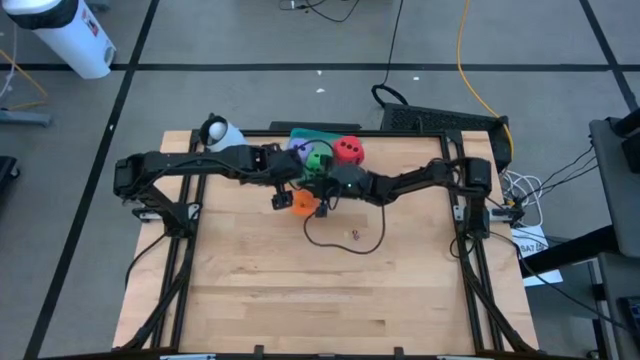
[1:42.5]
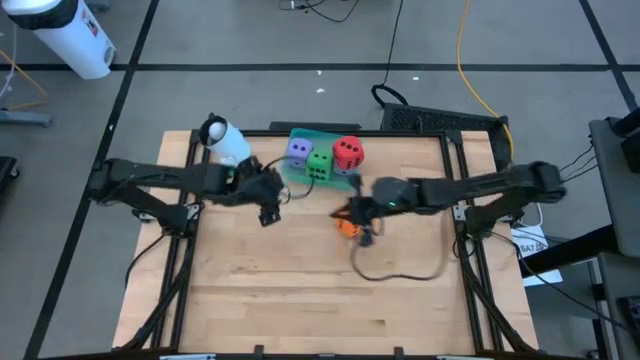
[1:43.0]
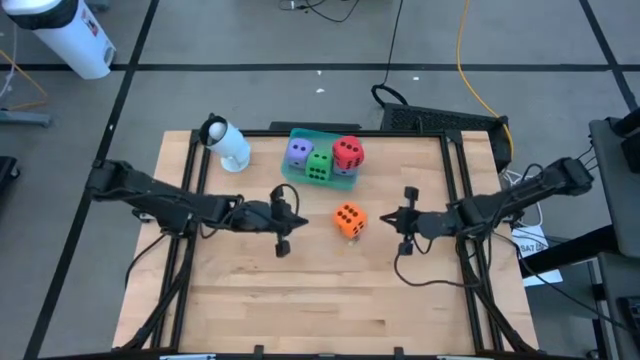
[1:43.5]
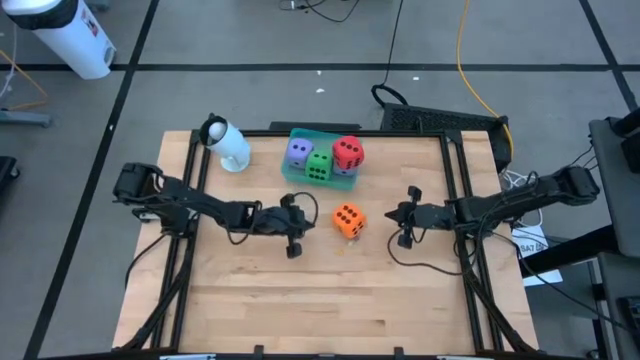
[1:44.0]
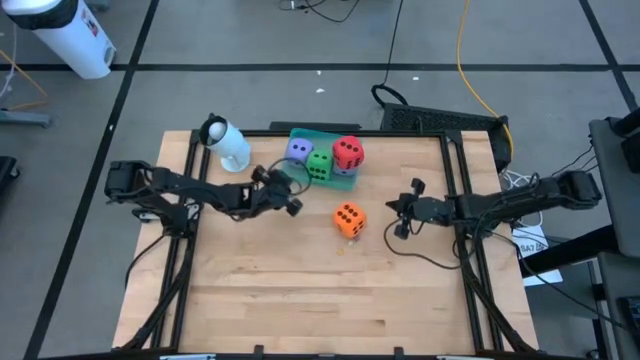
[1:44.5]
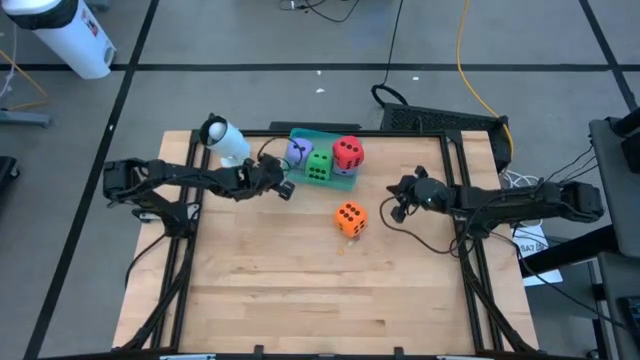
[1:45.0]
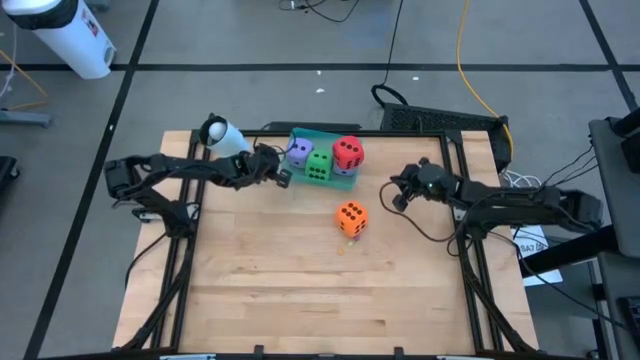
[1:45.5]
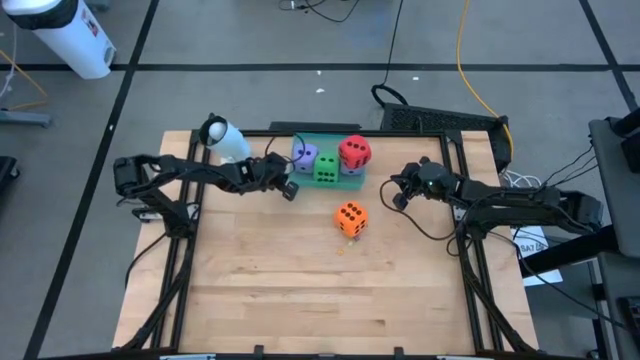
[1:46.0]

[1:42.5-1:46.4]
Task: Pick & Place Dice
Adjust the blue bin on the table

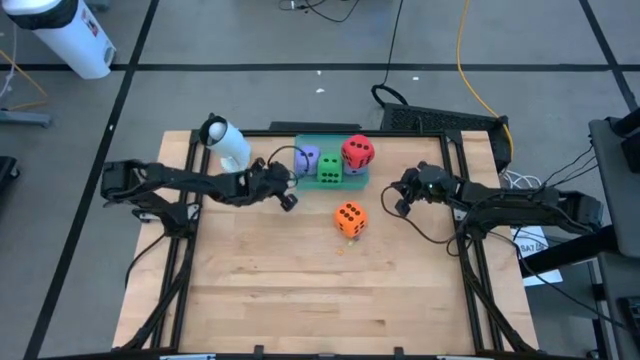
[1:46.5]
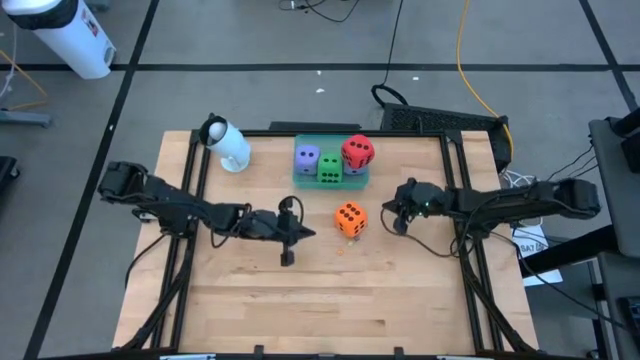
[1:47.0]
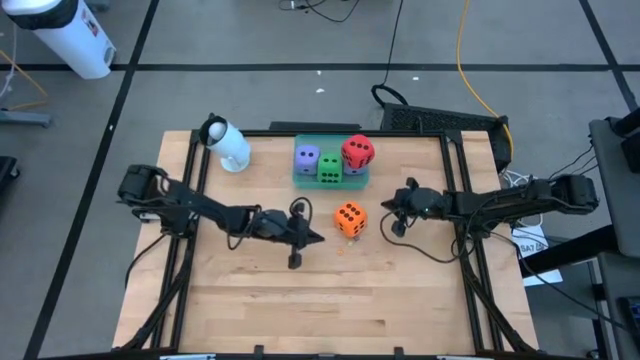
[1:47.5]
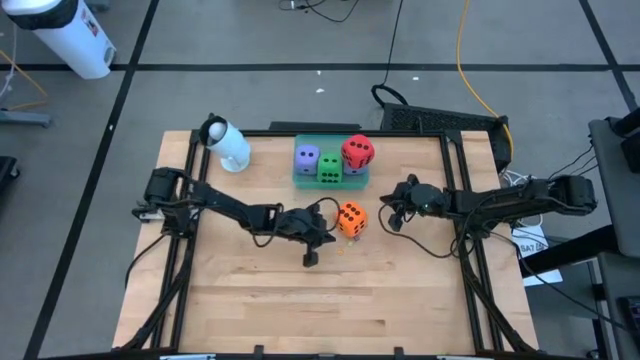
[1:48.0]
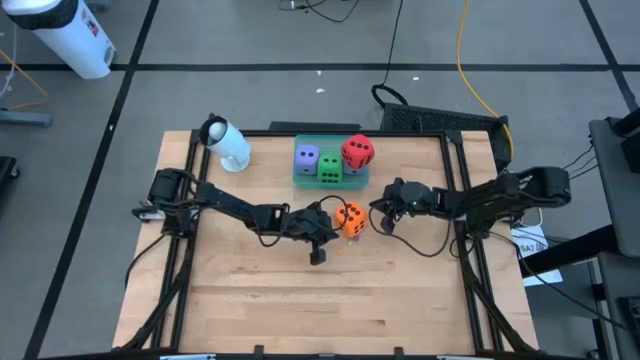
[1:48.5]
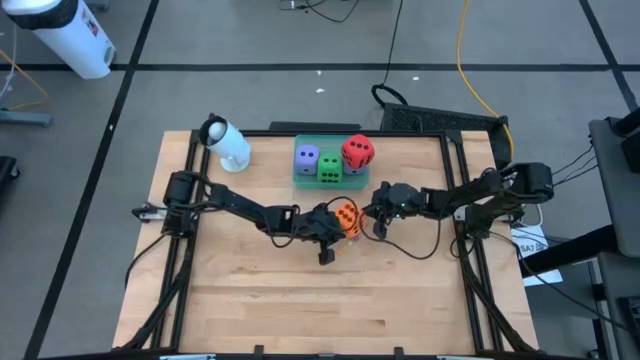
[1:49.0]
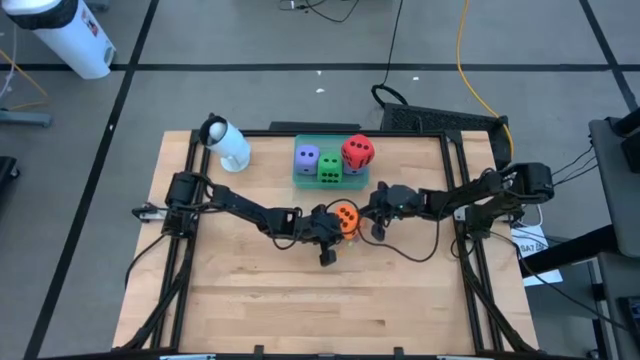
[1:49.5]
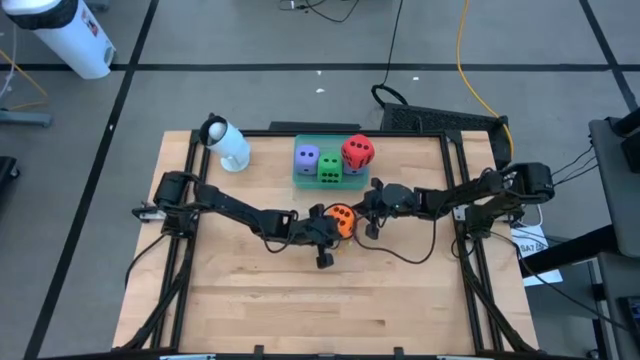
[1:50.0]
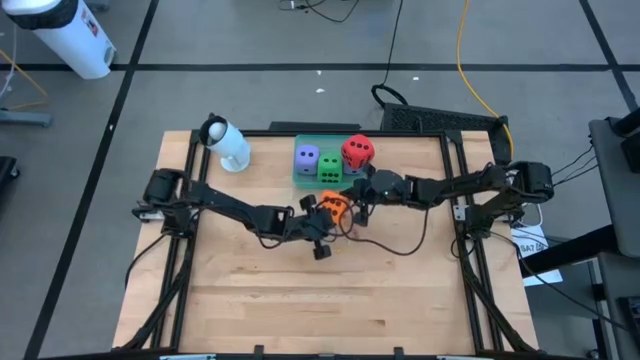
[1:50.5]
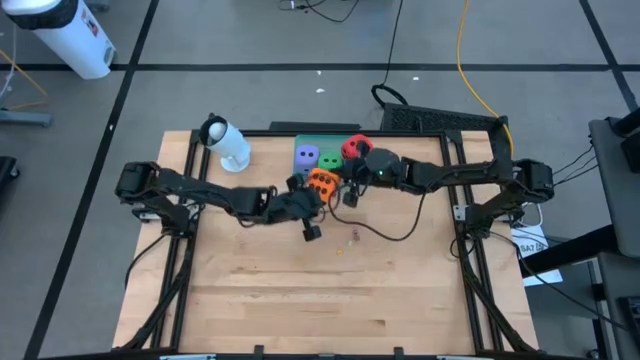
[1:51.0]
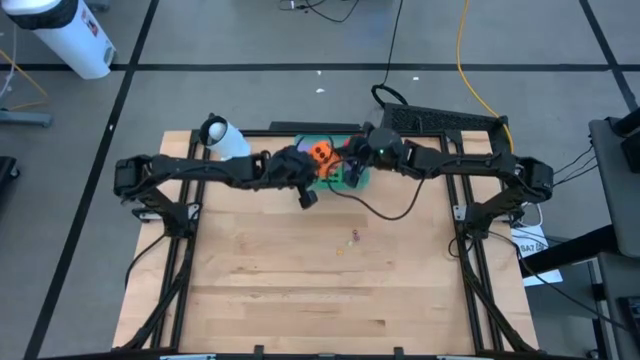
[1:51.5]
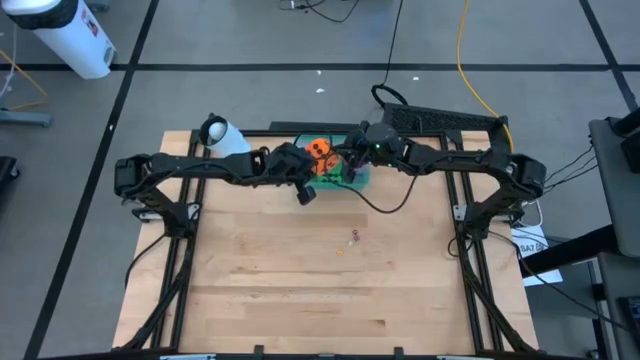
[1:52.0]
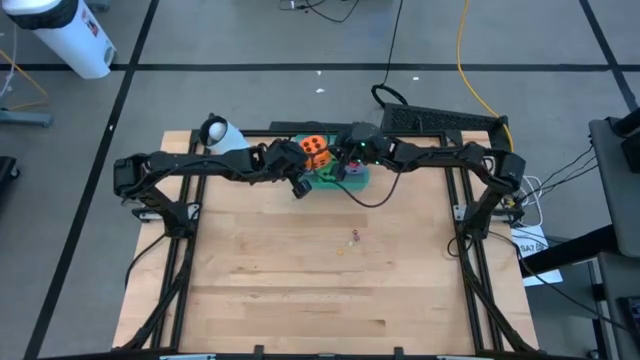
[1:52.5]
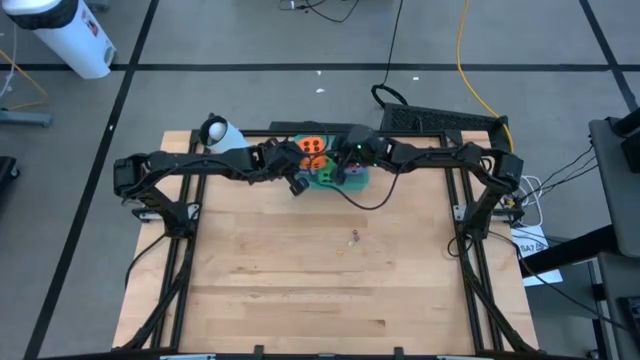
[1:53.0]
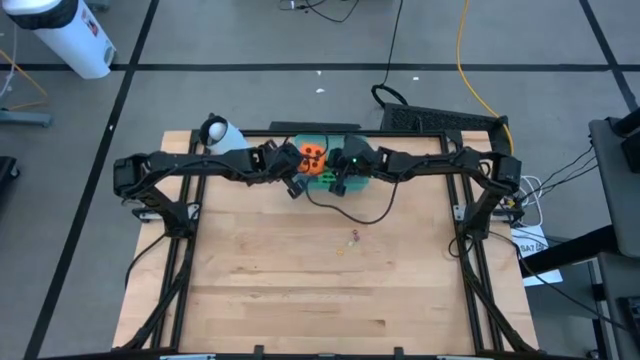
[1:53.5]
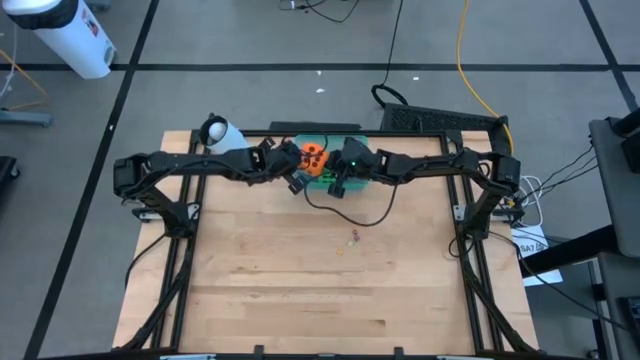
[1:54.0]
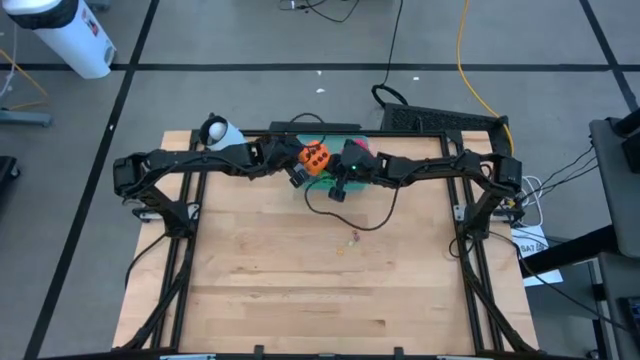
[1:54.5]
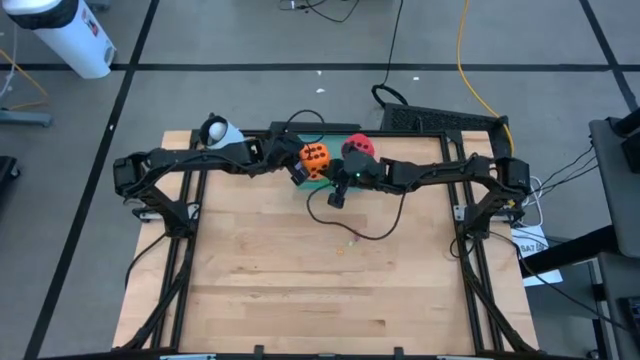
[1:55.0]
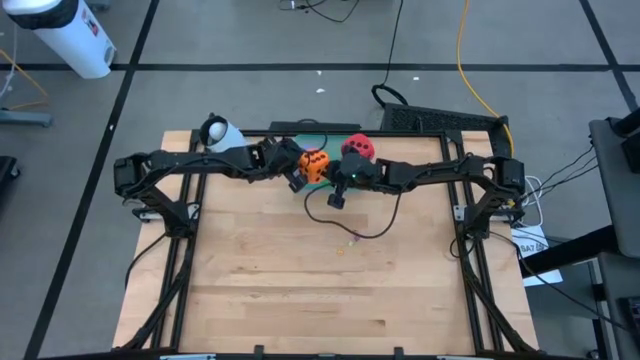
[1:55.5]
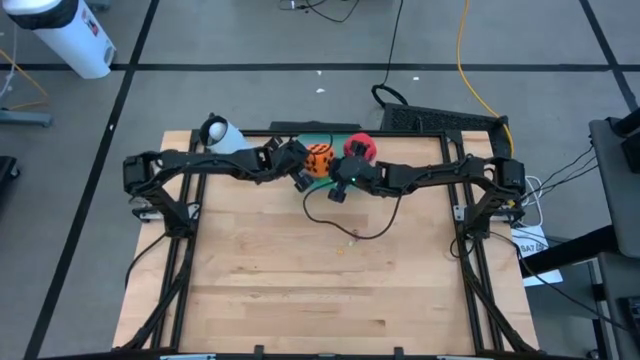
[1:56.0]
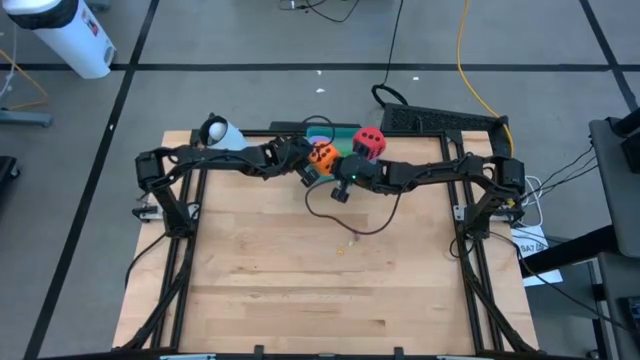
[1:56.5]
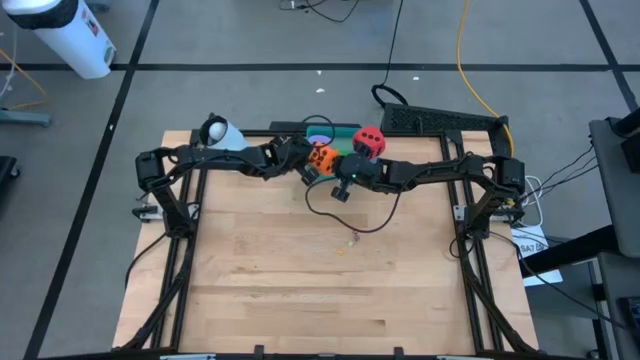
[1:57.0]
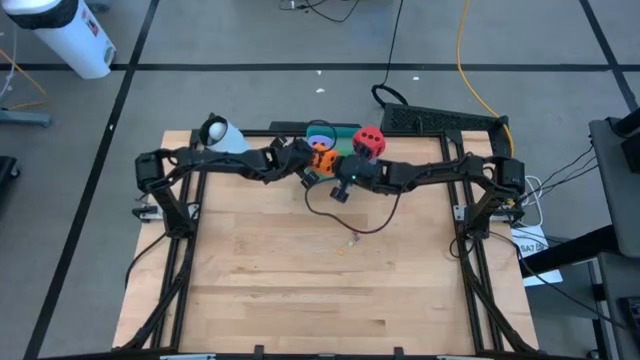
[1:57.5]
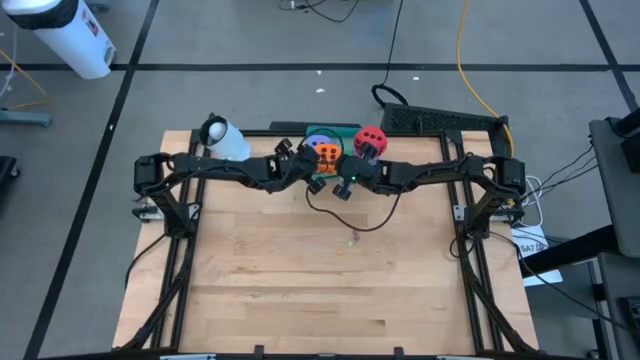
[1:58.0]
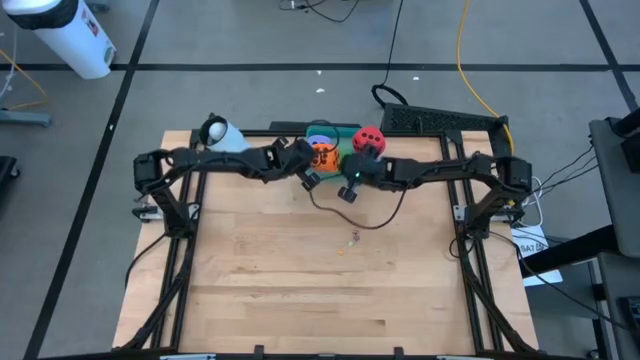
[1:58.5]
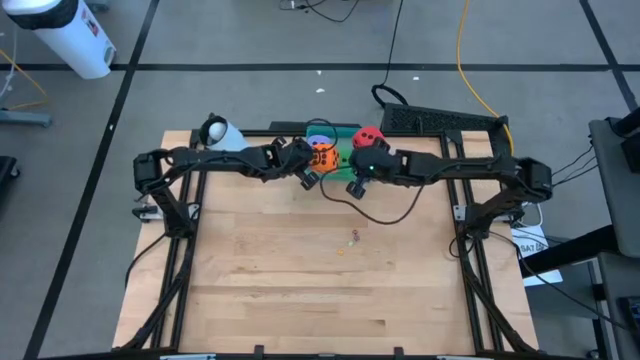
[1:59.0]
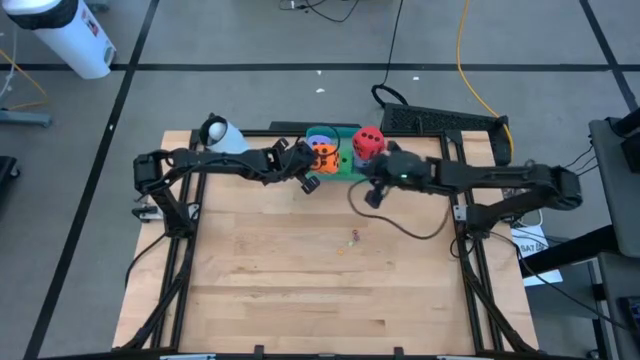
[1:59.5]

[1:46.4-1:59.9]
Put the big orange dice into the green bin

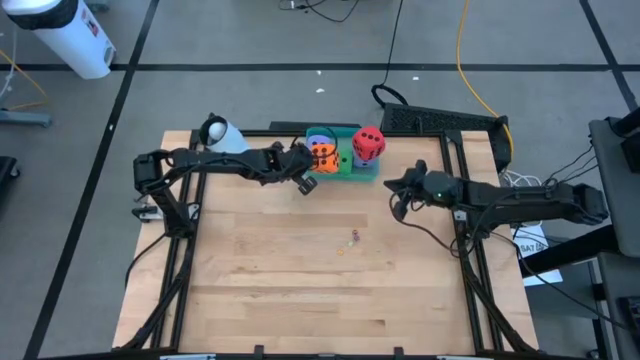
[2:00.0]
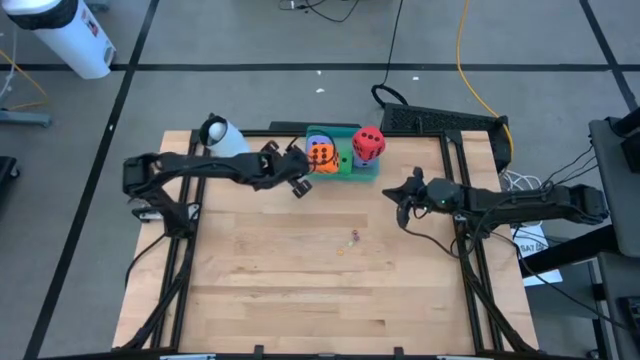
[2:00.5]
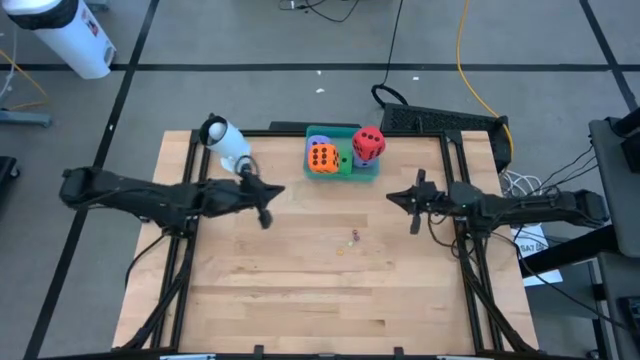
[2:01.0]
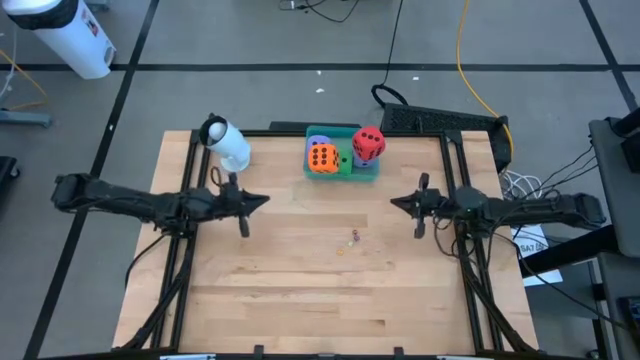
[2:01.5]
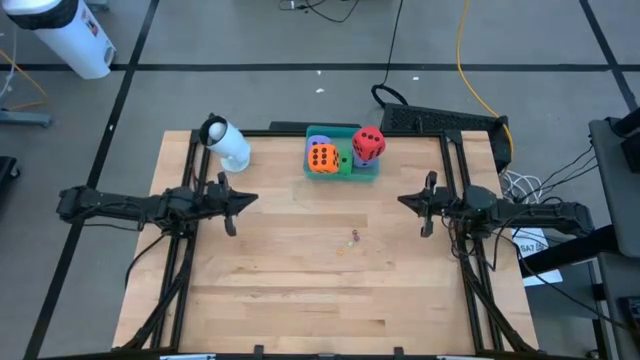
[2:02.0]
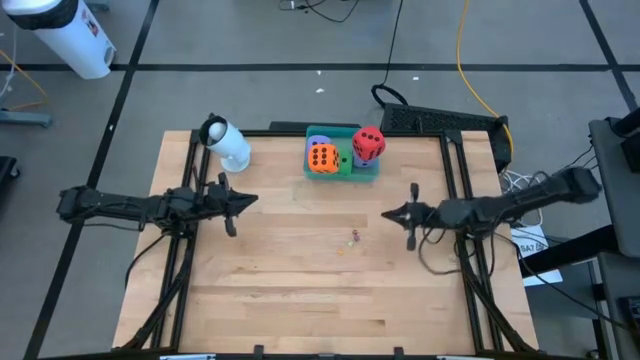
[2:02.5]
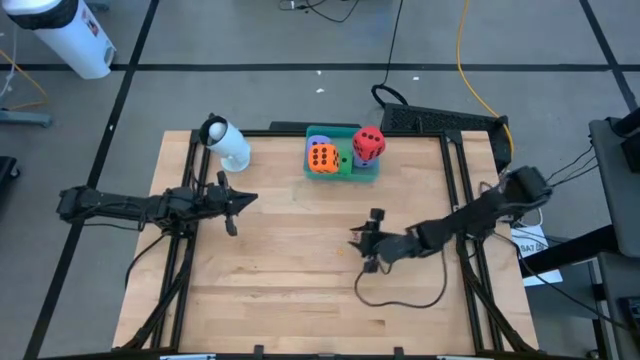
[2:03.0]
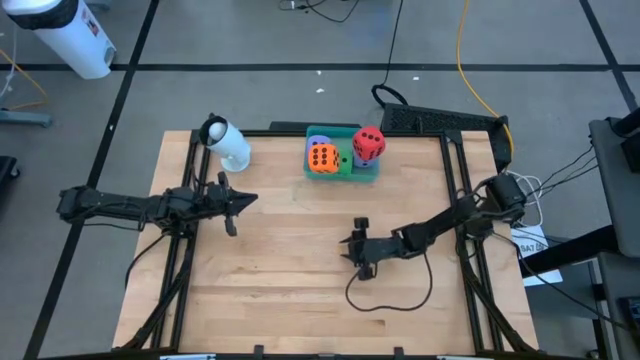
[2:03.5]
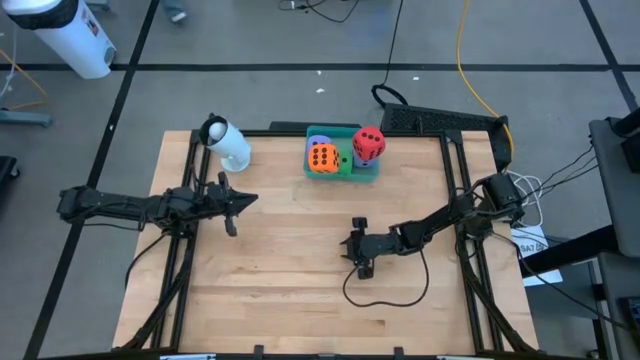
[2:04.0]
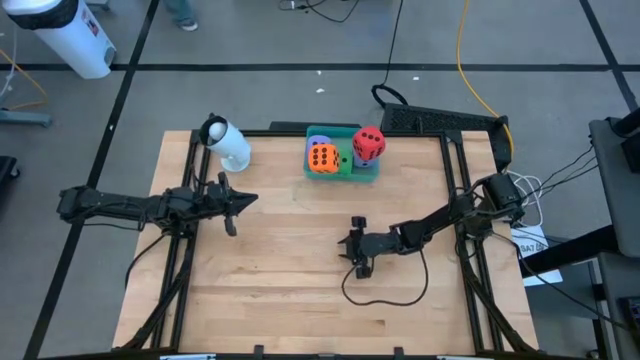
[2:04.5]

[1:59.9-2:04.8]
Put the small yellow dice into the green bin
